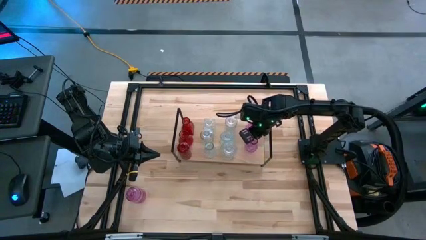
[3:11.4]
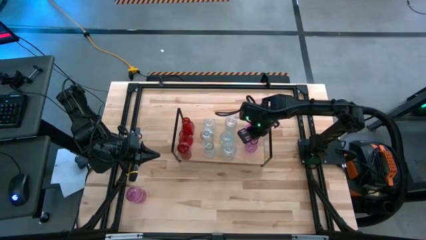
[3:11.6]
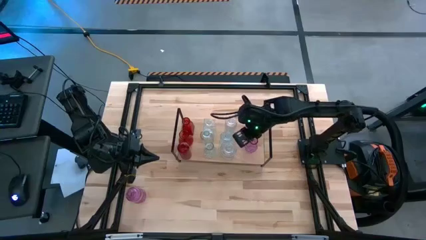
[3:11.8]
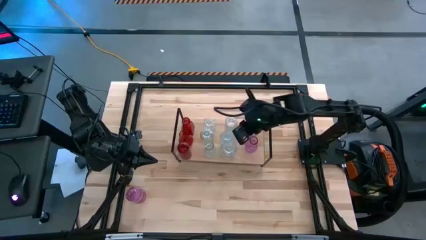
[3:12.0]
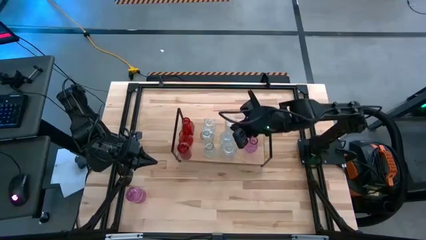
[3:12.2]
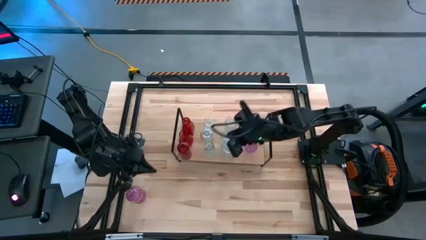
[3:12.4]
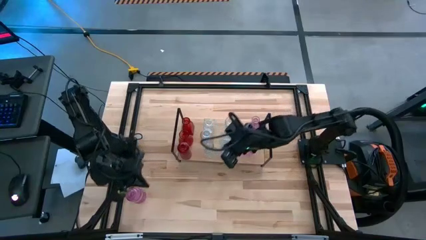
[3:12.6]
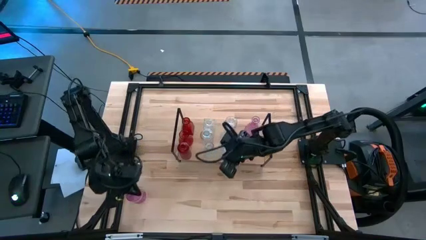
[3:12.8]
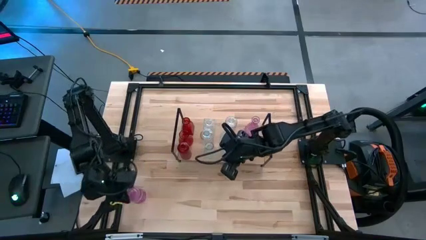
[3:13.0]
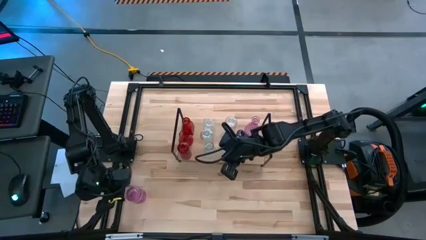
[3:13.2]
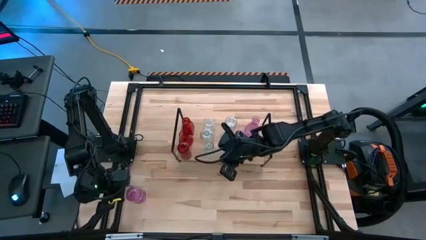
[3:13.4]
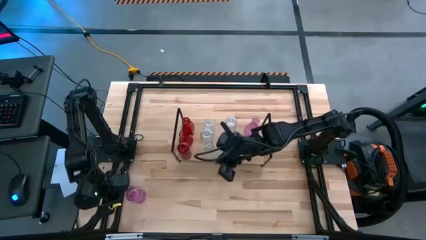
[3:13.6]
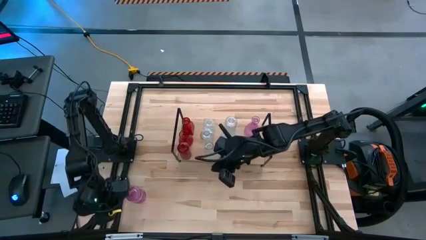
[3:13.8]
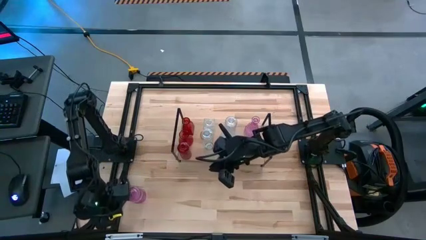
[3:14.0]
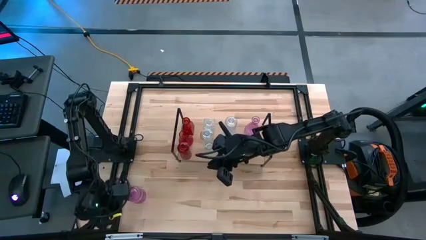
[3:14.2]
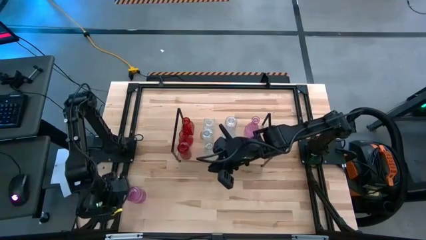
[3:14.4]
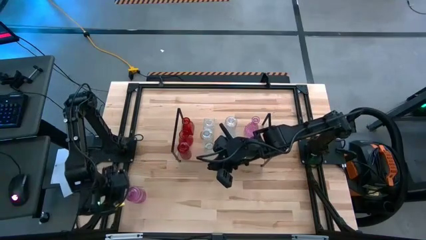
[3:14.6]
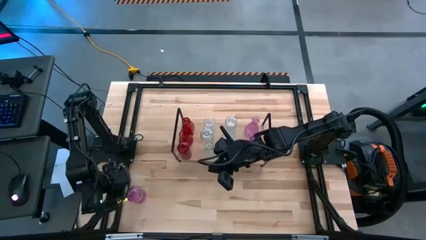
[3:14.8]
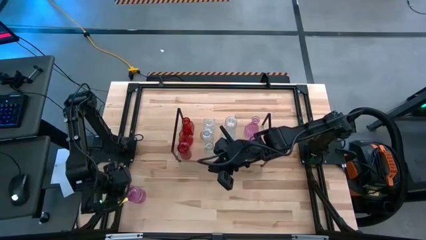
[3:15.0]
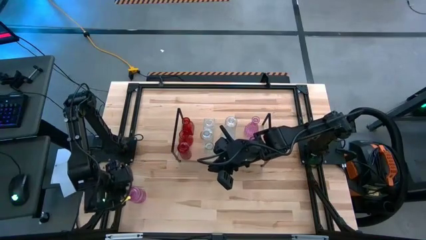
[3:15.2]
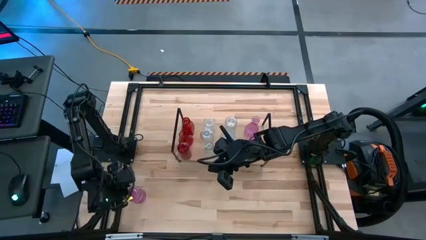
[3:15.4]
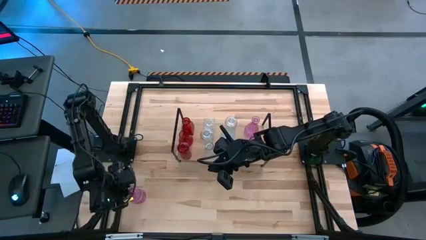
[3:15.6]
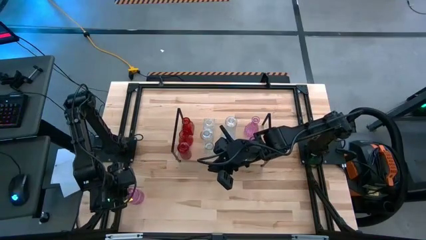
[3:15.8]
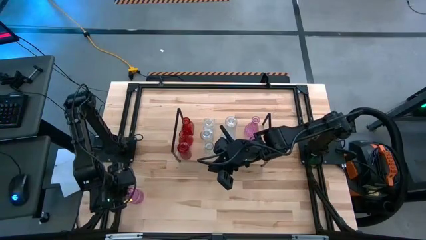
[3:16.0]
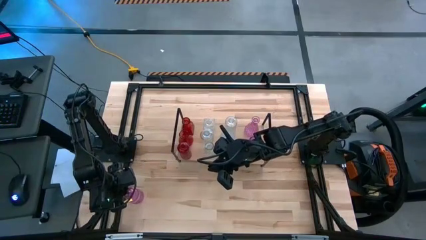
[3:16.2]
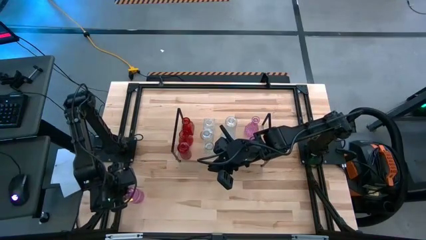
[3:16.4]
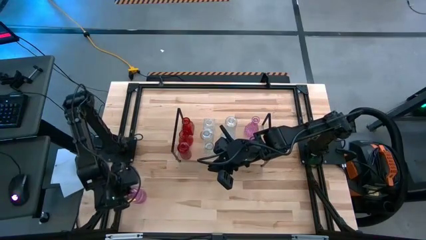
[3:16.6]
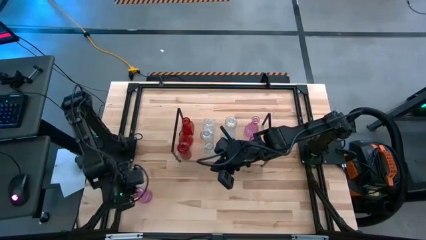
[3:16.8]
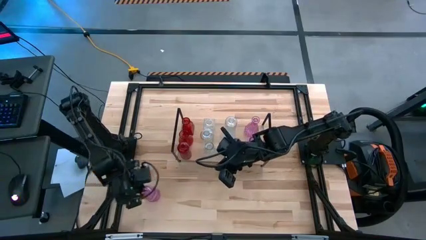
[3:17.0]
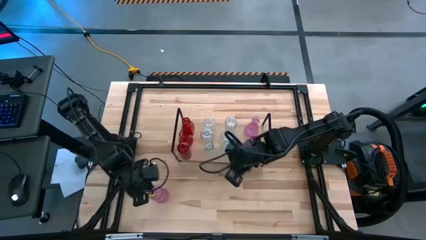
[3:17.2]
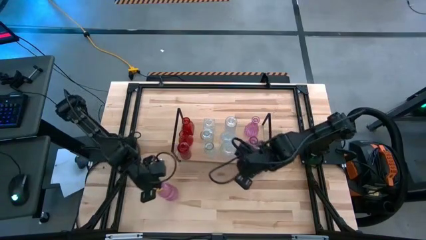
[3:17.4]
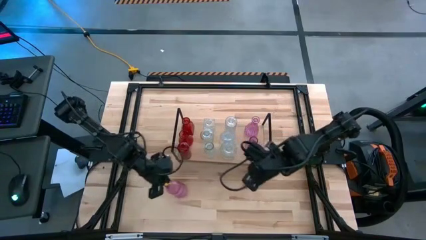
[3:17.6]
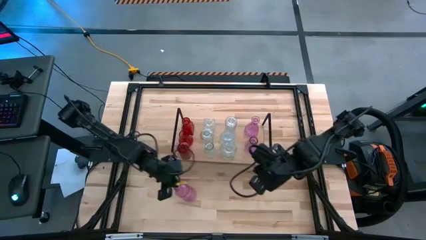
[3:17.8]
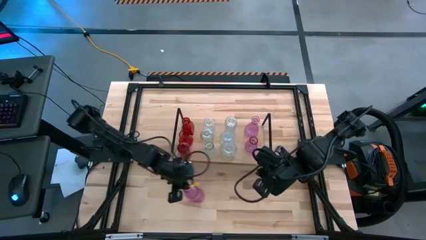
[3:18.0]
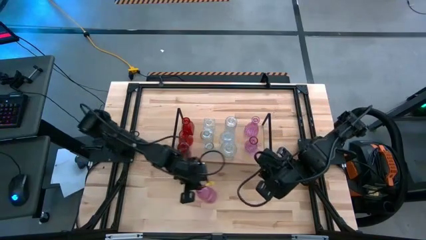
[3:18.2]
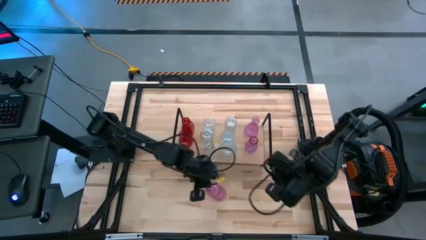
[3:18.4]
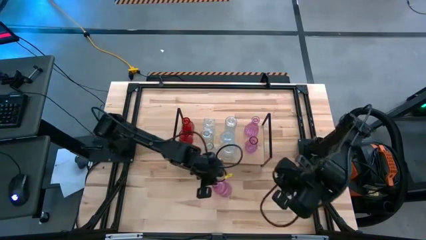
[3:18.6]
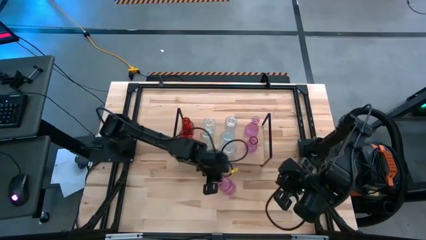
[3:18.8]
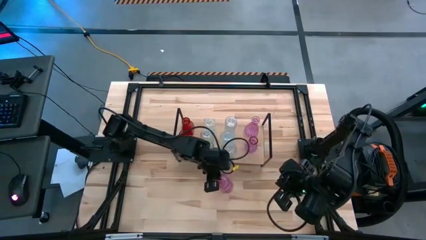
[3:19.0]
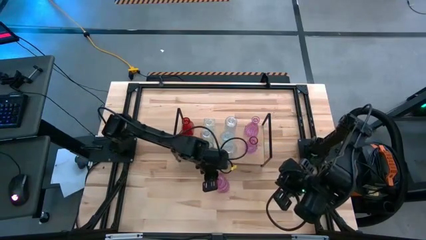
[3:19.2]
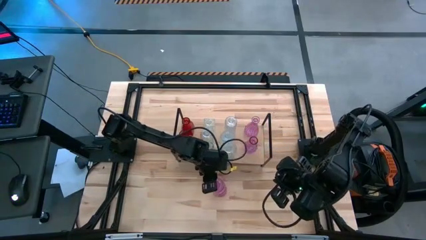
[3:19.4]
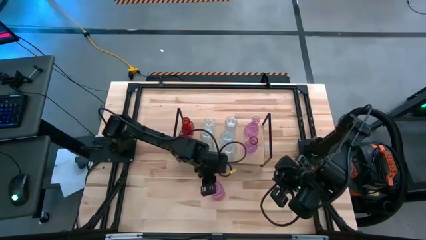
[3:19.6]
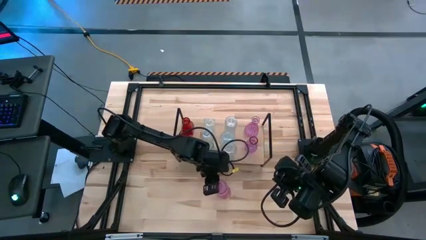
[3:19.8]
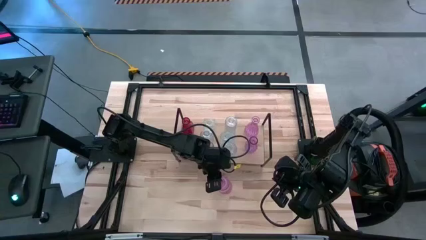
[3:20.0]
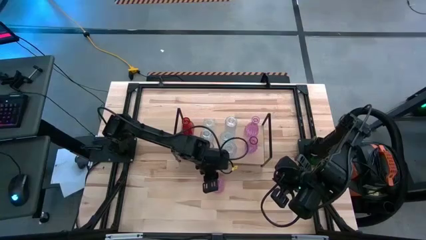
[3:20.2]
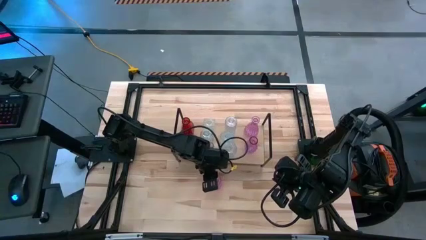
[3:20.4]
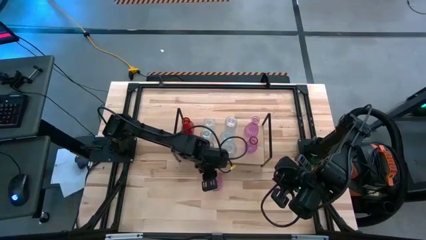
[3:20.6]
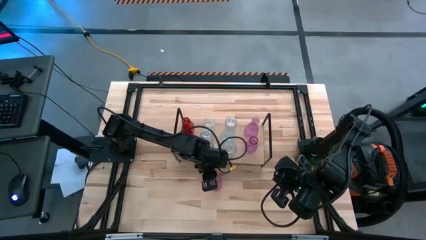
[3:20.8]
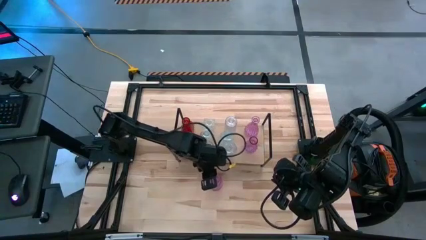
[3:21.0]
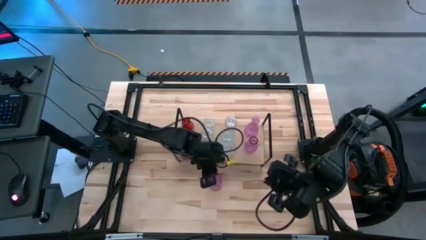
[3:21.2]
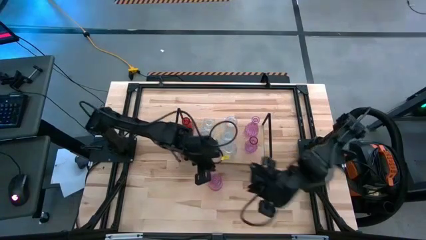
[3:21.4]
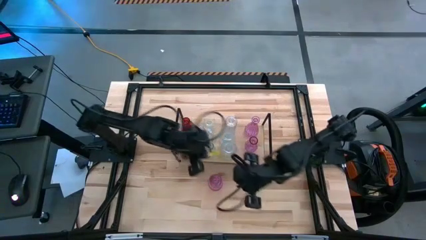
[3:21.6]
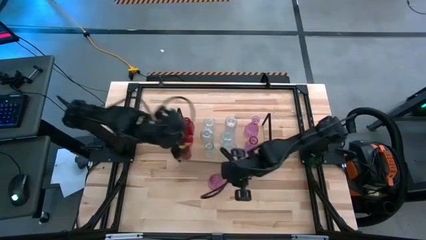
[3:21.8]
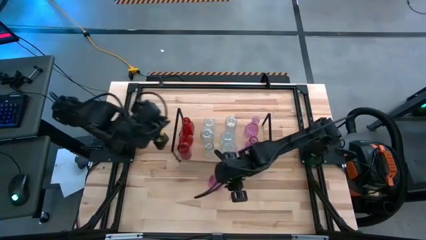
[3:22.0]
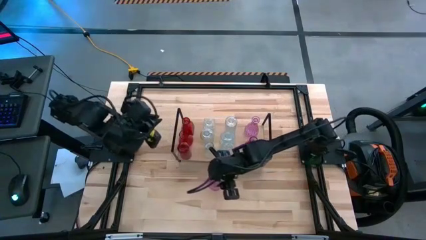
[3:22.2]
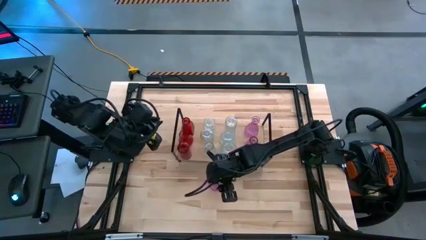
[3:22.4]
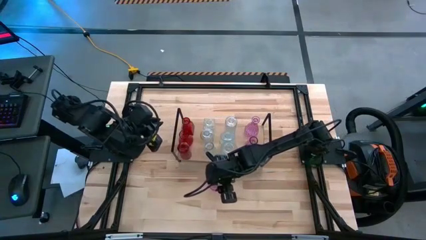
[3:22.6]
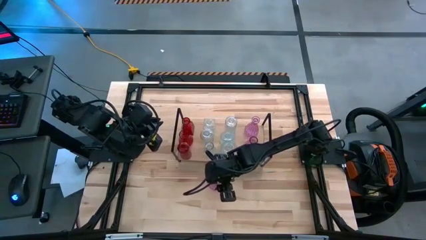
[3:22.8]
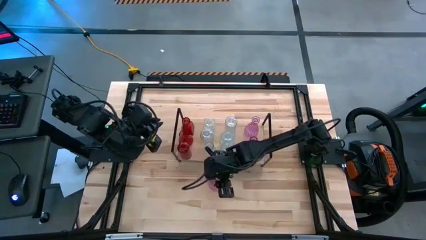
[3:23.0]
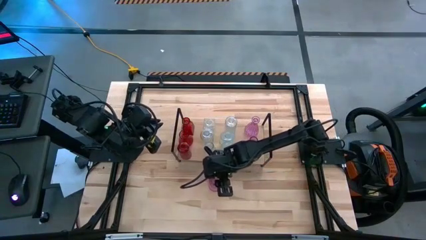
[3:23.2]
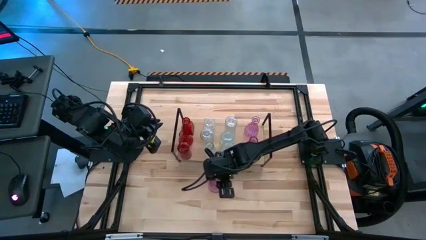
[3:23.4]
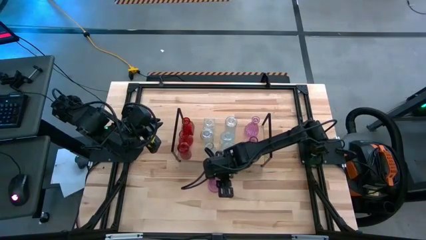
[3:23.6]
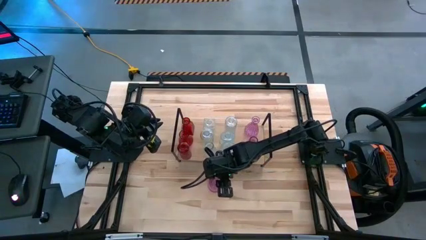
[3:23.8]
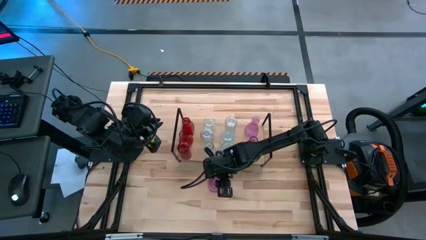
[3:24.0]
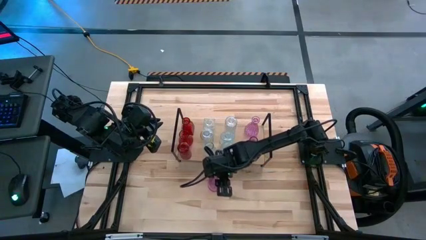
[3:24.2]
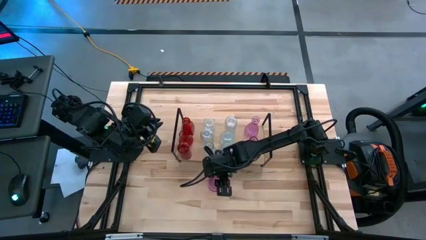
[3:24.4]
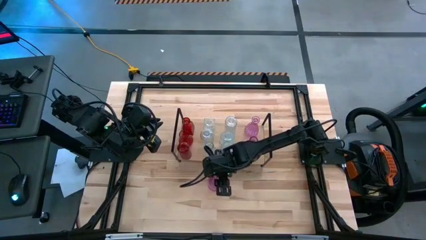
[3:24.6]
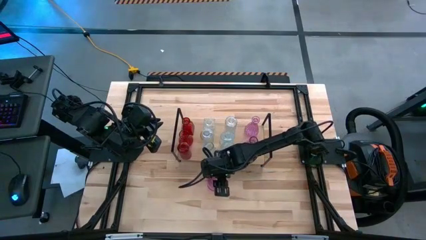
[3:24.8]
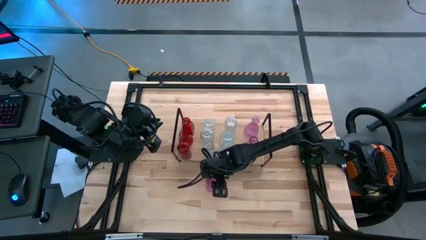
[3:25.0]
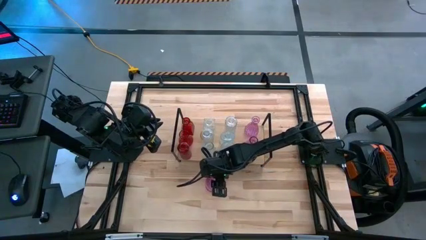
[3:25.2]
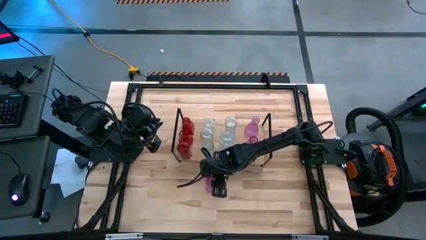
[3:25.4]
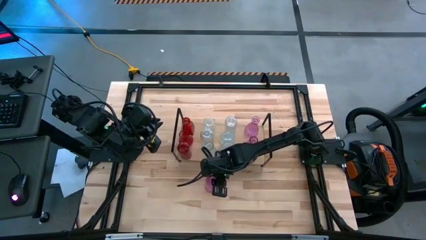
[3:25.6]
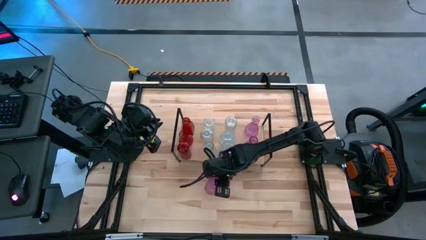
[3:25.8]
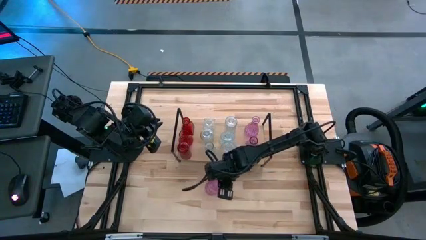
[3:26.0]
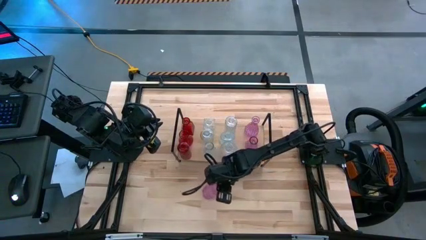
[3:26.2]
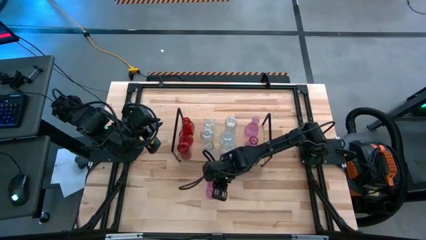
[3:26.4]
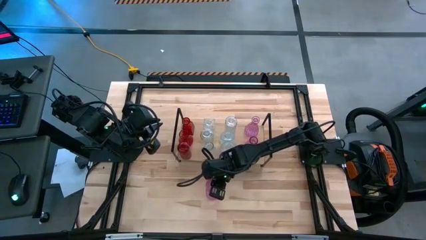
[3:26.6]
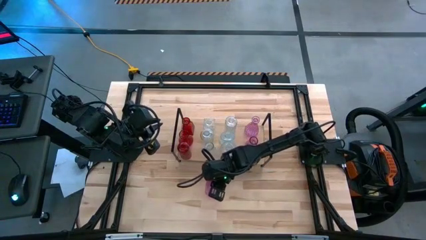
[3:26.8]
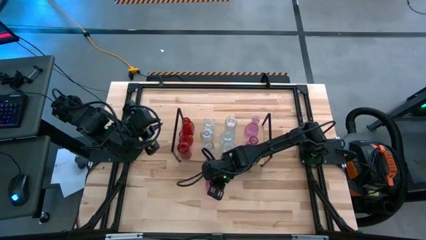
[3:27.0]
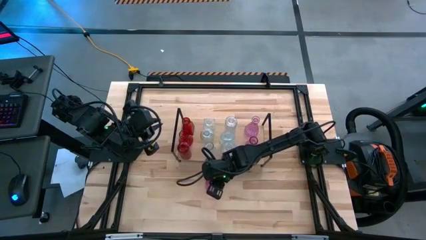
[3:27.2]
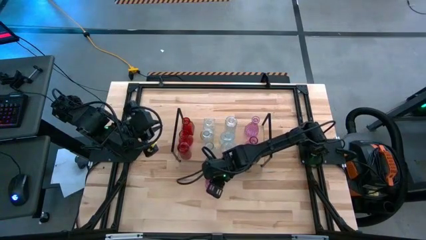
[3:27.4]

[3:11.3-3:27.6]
Task: sort vases onto shelf
Put the transparent vase aligned with the other transparent vase on the shelf
